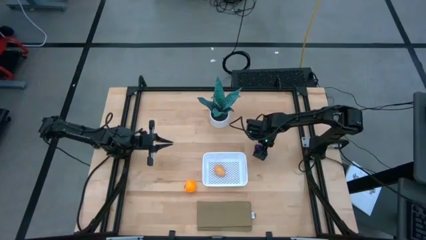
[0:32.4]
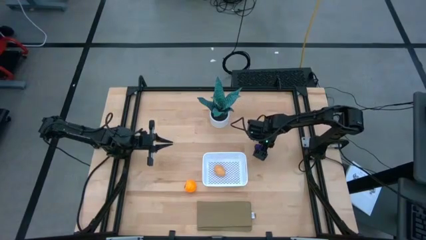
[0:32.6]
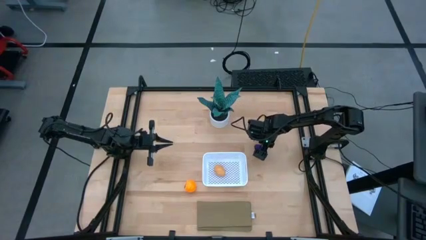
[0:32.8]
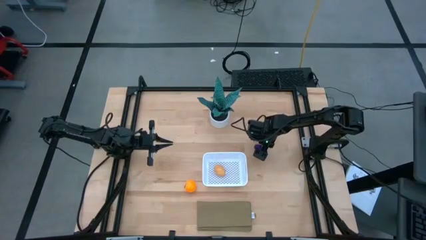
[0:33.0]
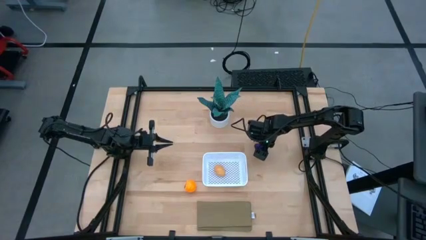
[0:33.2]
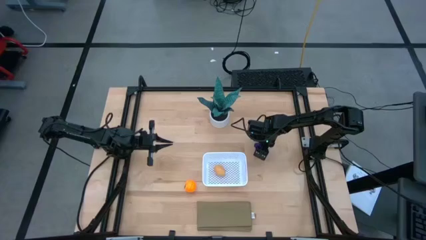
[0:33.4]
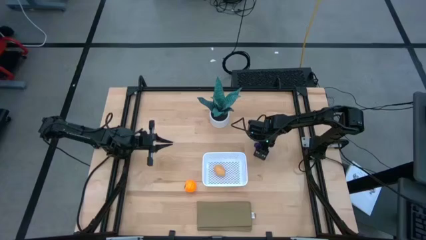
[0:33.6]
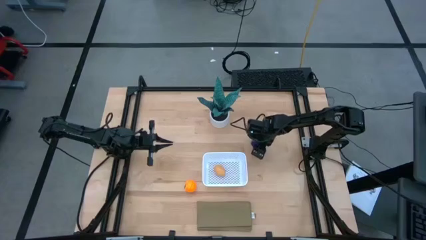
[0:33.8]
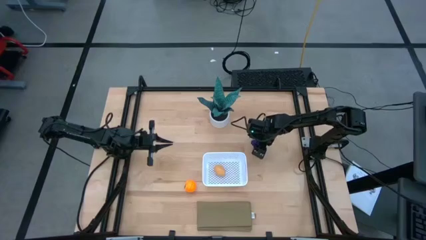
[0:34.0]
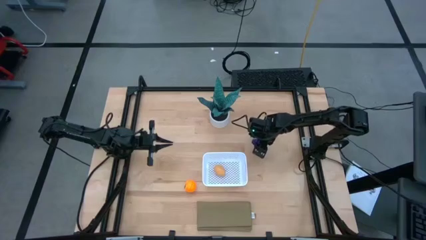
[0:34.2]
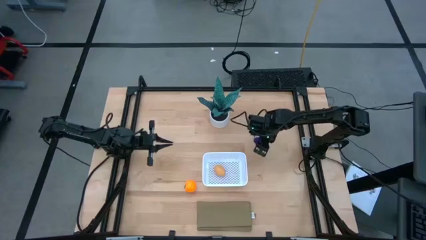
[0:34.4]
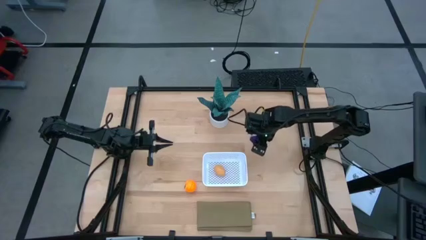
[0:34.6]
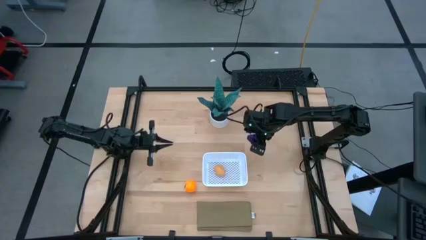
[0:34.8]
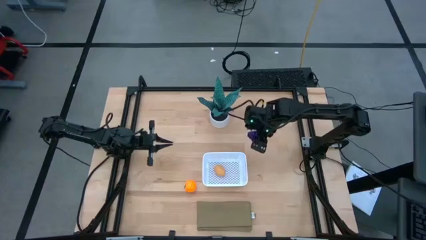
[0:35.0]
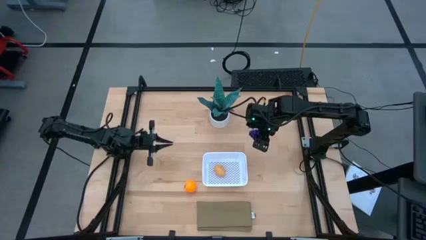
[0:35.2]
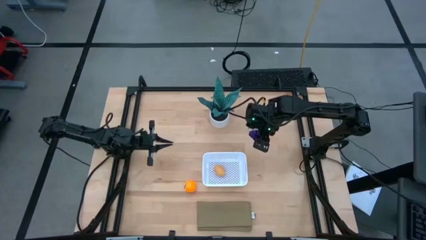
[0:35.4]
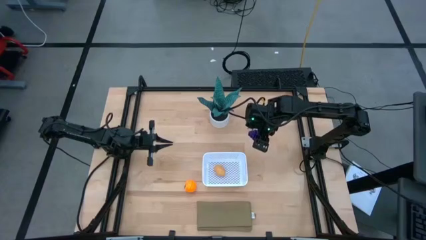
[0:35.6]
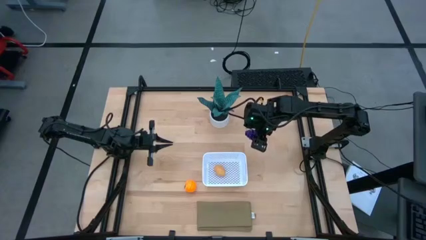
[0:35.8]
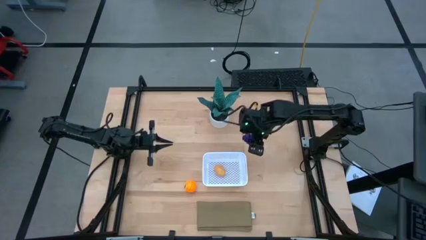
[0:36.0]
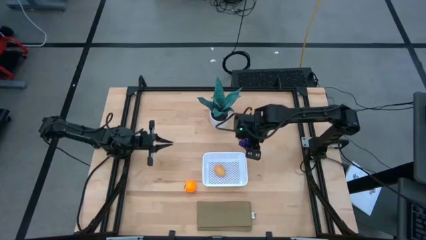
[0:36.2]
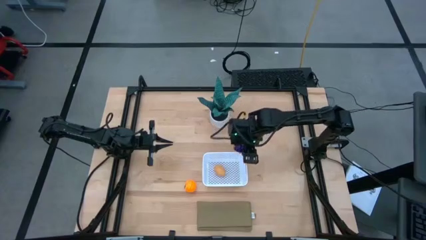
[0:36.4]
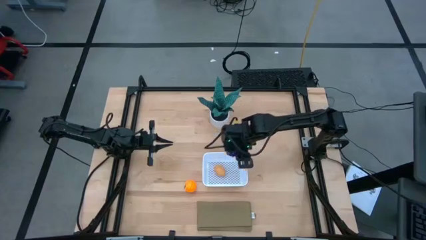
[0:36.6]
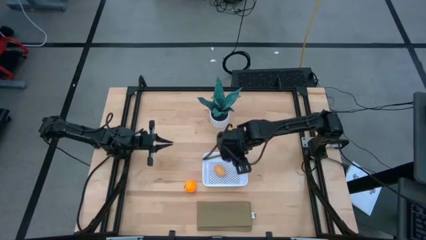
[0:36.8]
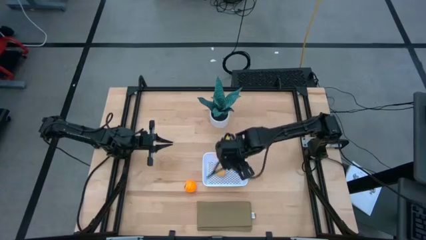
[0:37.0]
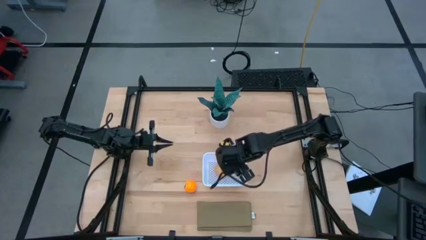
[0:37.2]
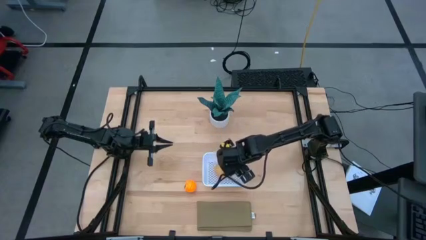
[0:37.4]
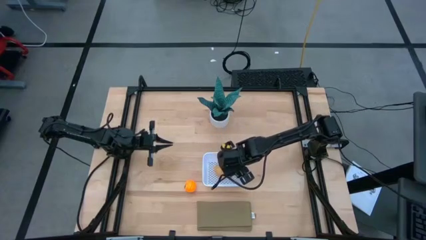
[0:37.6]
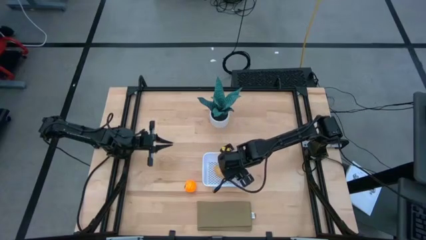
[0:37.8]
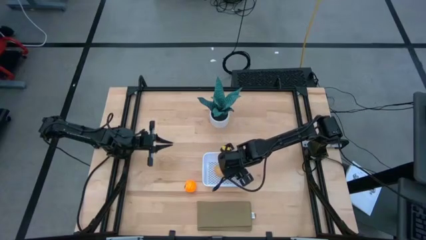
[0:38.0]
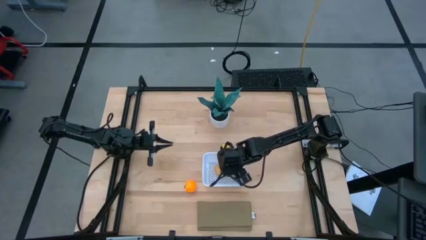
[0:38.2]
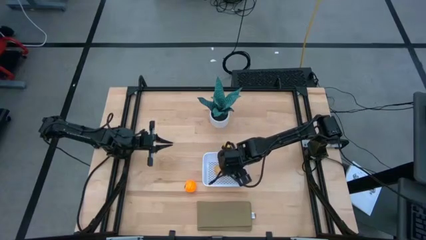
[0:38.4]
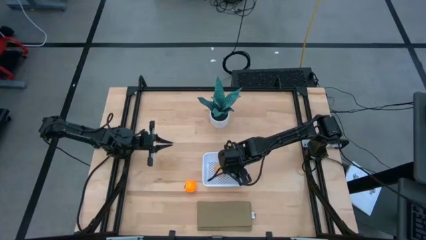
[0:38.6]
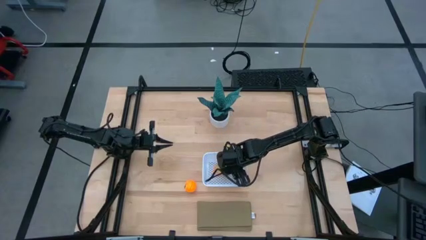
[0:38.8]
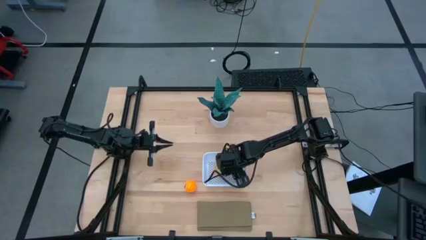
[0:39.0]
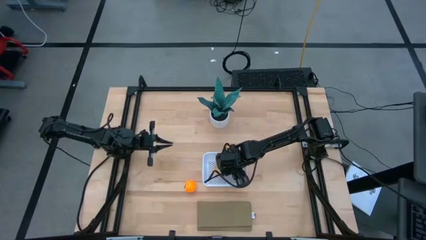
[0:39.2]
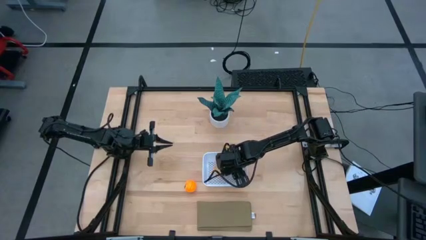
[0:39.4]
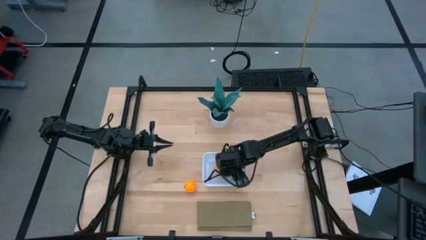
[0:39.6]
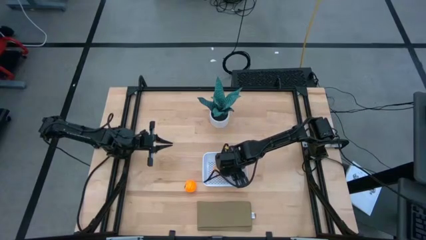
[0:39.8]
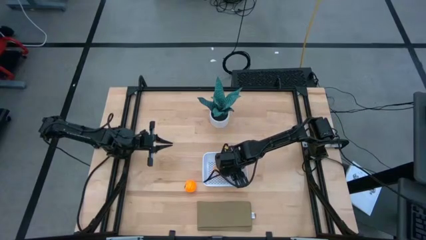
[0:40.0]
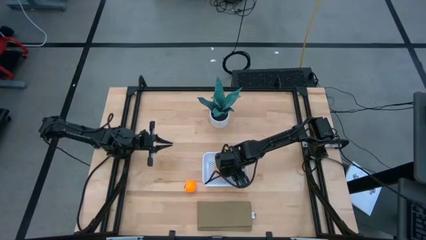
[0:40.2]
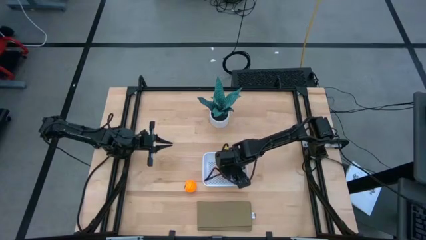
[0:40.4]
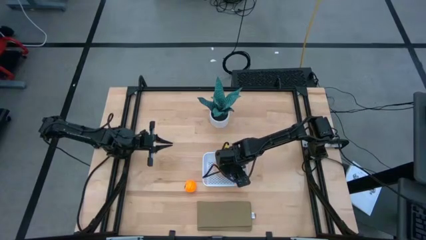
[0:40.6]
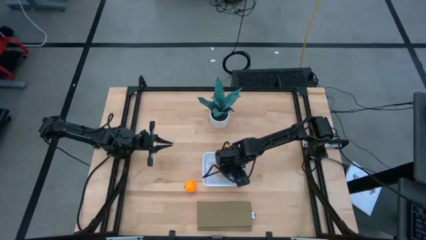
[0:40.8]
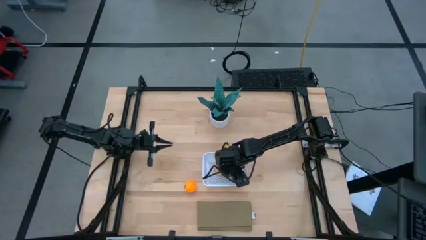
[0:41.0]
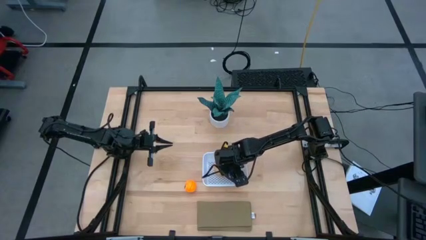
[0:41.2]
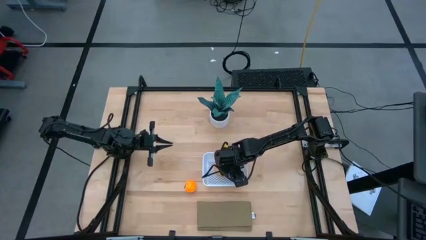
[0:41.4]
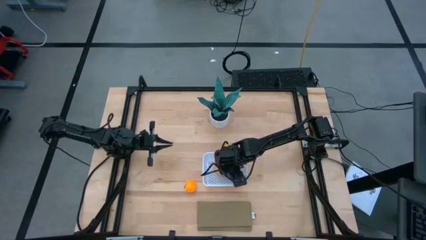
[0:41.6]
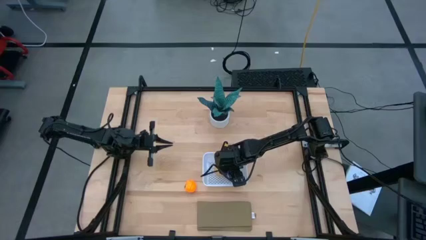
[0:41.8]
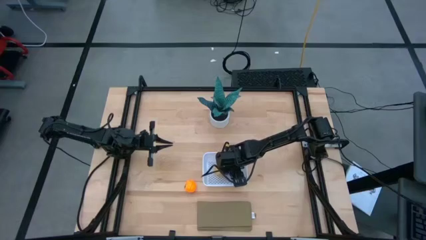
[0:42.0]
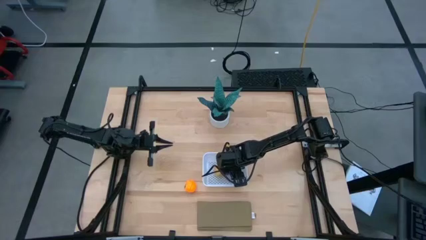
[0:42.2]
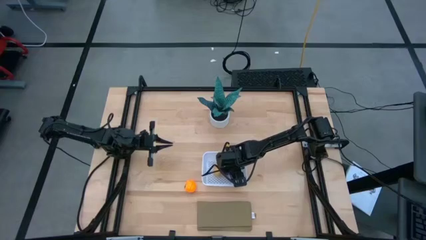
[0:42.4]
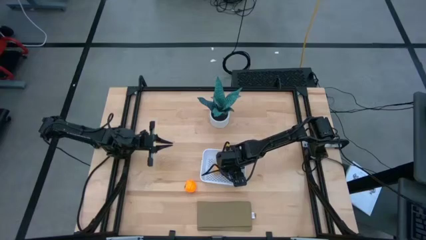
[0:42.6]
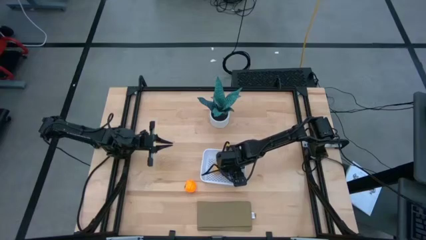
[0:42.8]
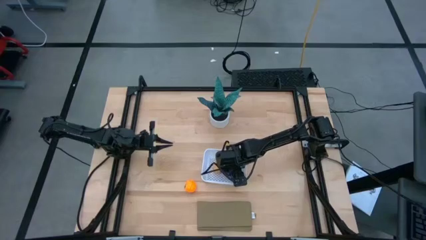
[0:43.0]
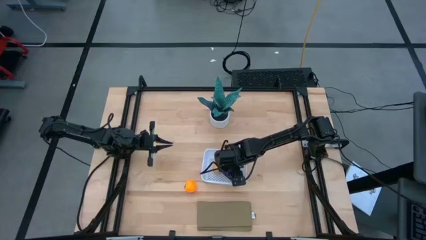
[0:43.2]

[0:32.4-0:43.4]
Task: Pick and placing Produce into tupperware
Put the violet grapes into the white basket

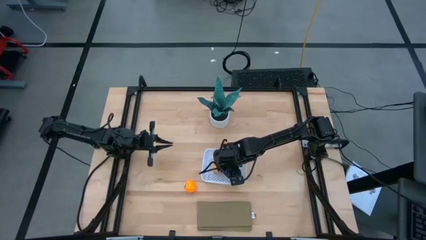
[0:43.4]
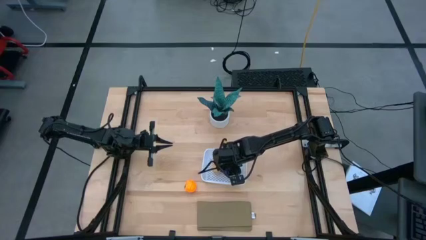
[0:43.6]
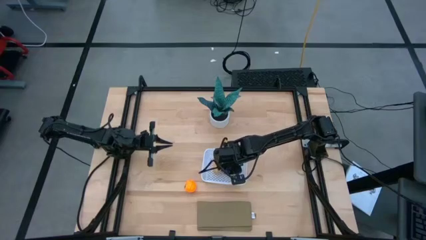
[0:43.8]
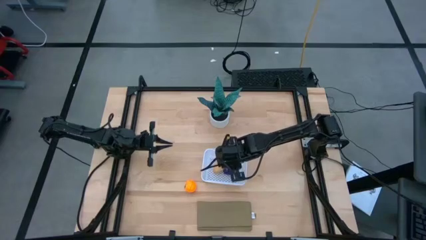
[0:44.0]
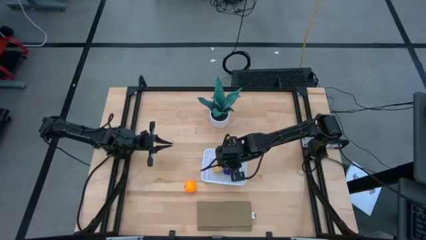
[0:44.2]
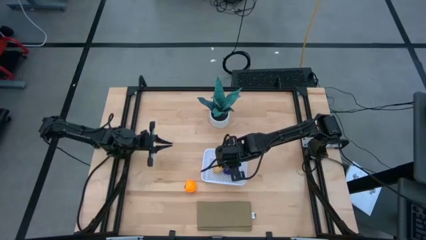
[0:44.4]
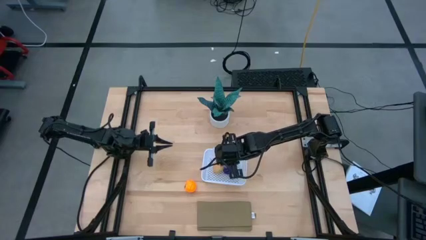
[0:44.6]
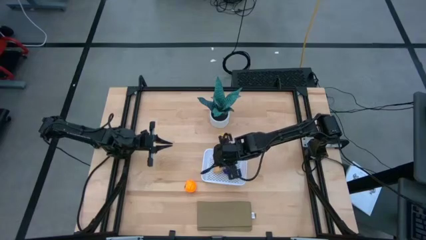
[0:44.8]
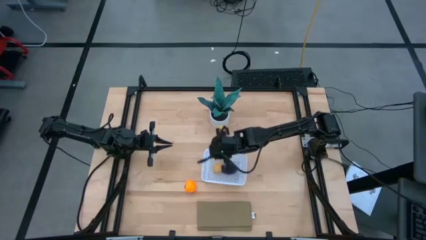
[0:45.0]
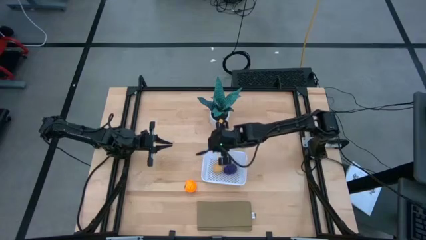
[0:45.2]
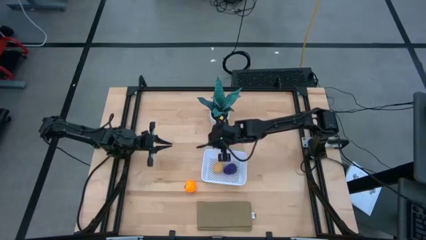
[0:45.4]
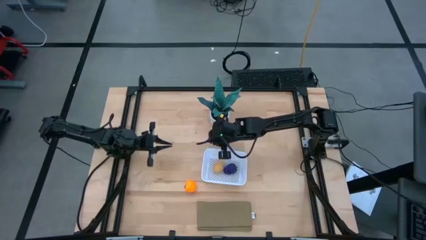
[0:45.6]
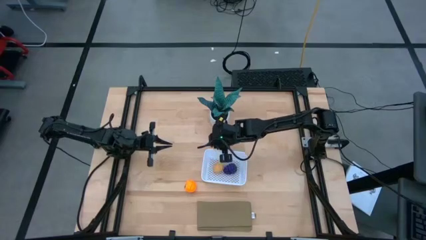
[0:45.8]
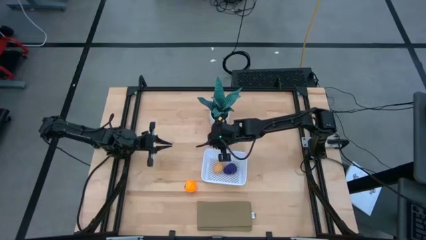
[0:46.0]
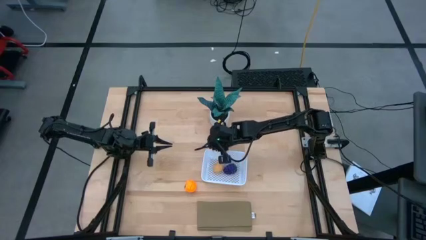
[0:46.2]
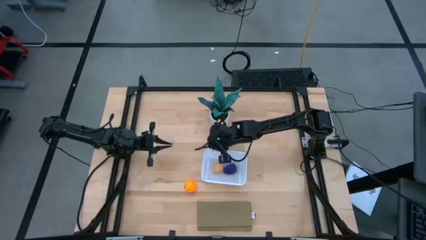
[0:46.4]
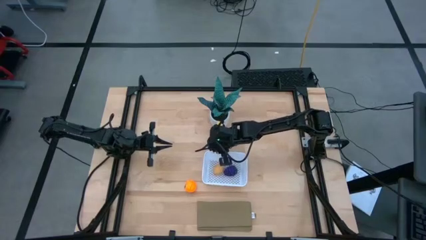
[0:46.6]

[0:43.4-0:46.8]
Adjust the white bin
